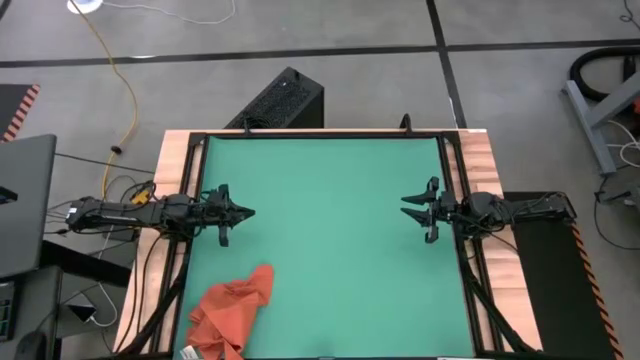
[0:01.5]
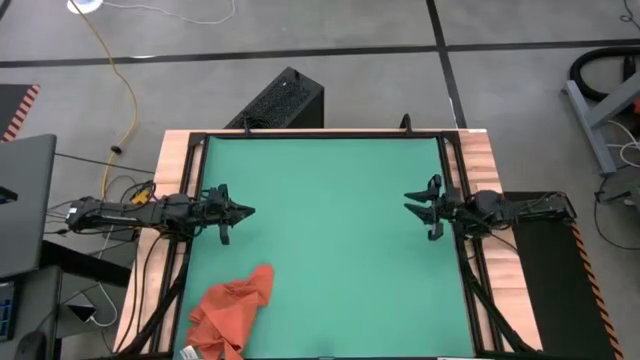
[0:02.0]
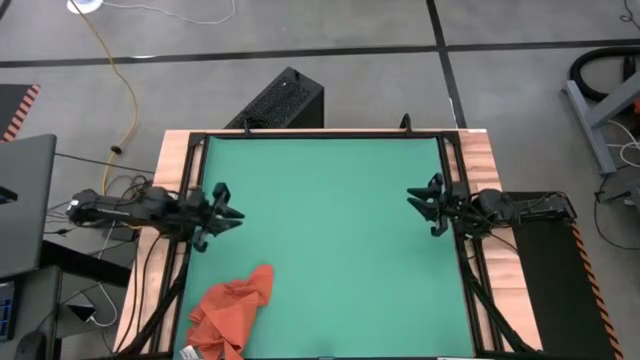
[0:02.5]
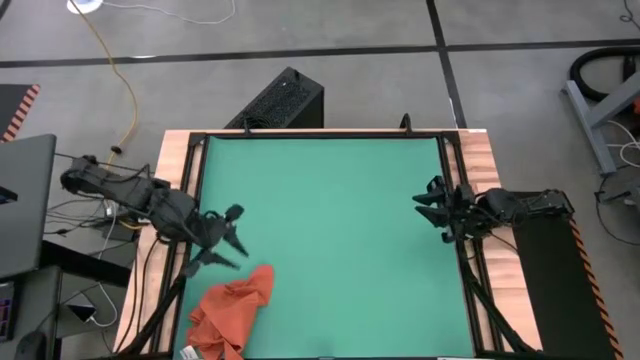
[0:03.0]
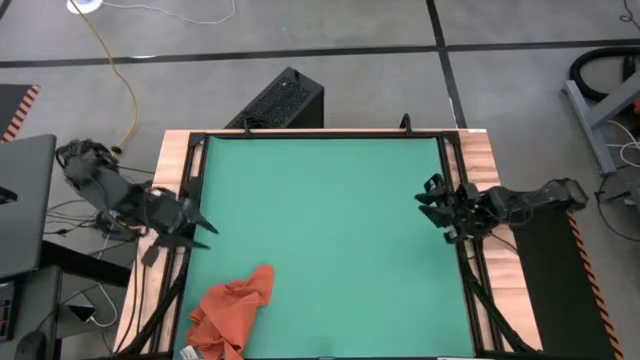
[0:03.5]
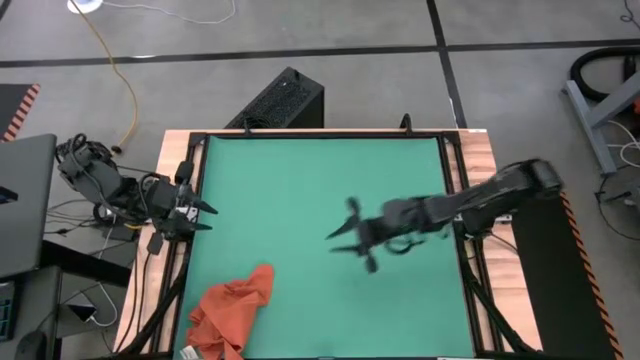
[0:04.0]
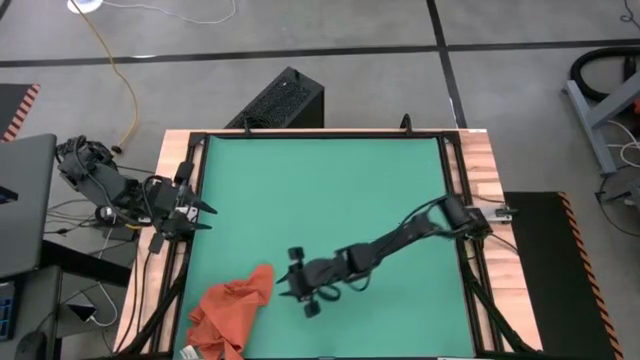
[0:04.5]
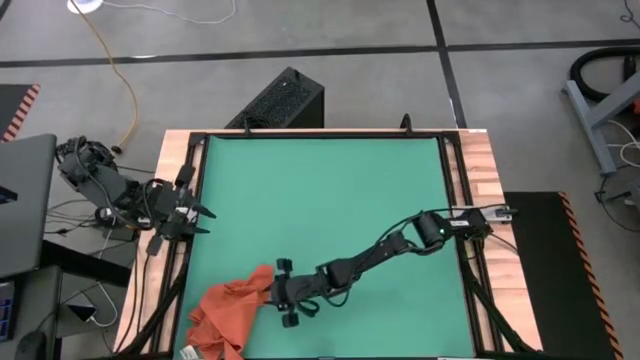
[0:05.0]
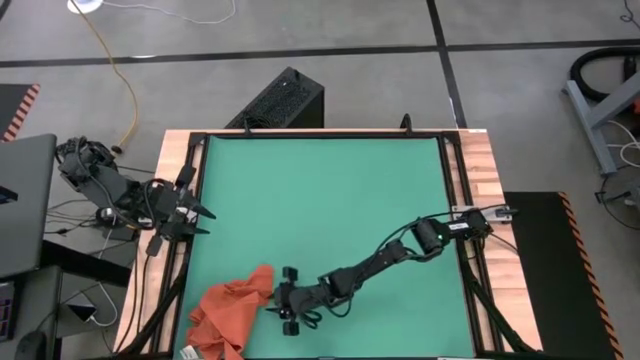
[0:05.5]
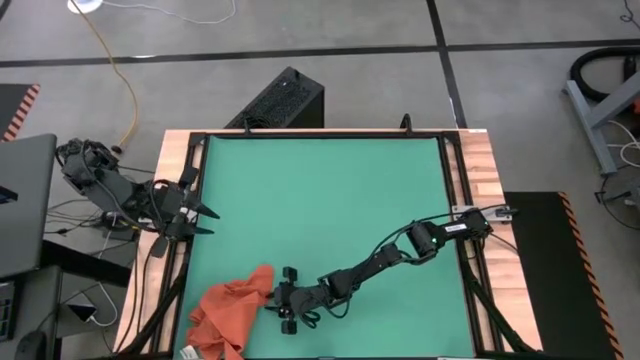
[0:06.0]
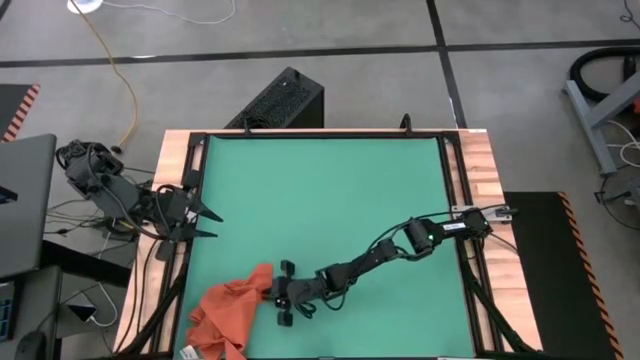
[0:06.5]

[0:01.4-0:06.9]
Task: Roll towel
Fold the orange towel

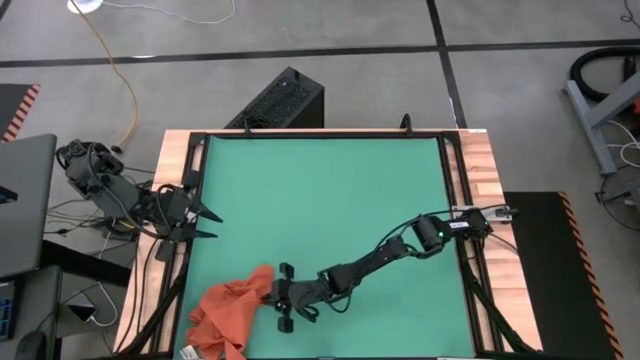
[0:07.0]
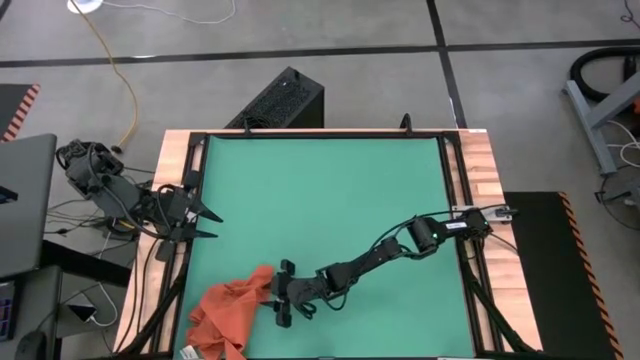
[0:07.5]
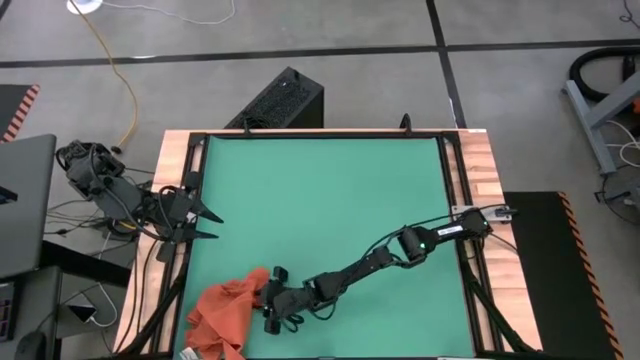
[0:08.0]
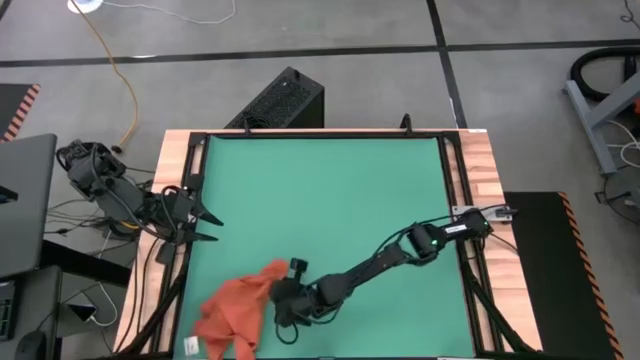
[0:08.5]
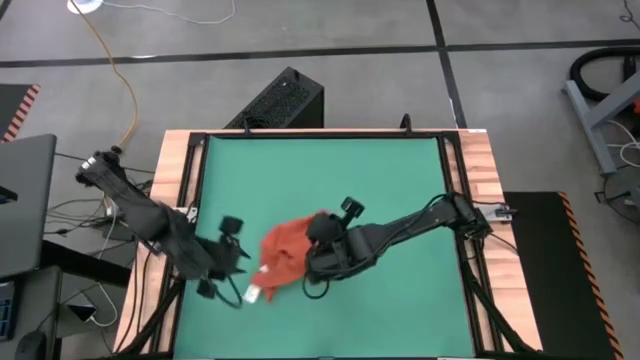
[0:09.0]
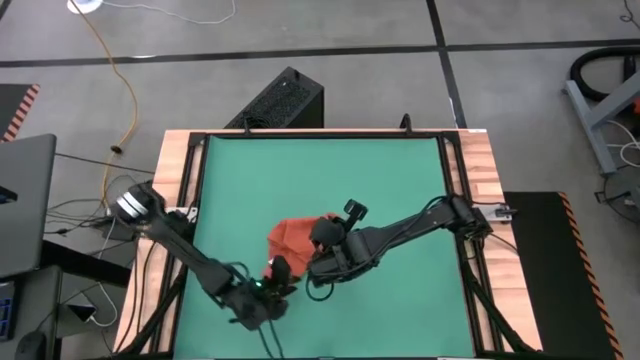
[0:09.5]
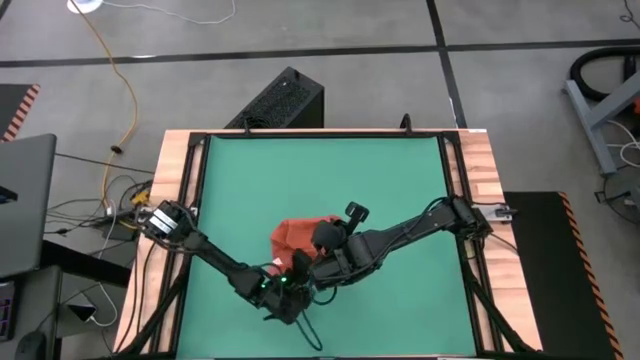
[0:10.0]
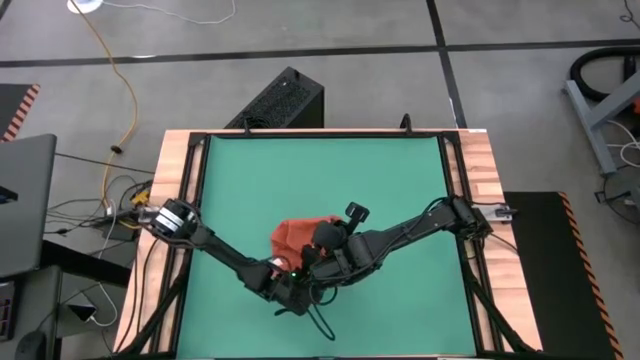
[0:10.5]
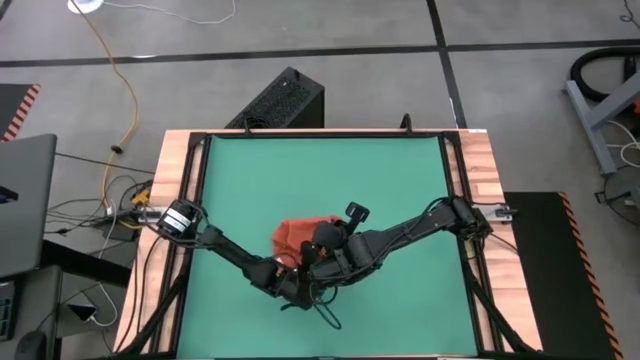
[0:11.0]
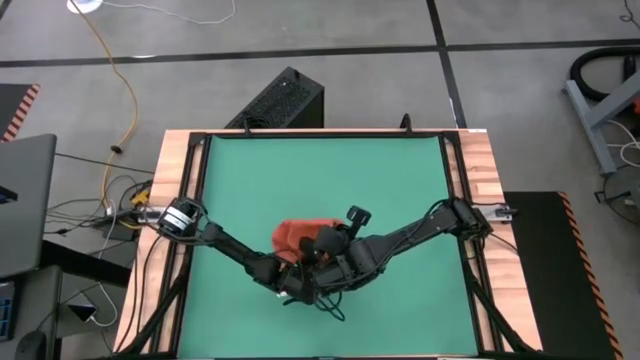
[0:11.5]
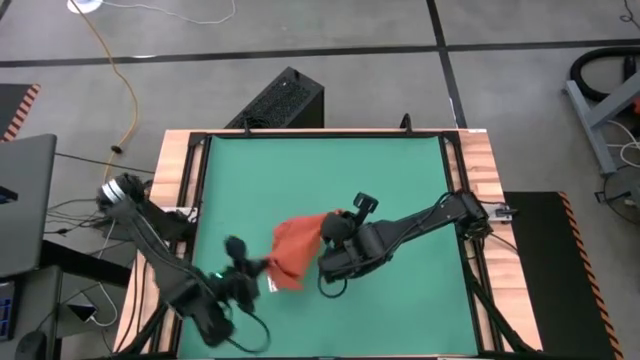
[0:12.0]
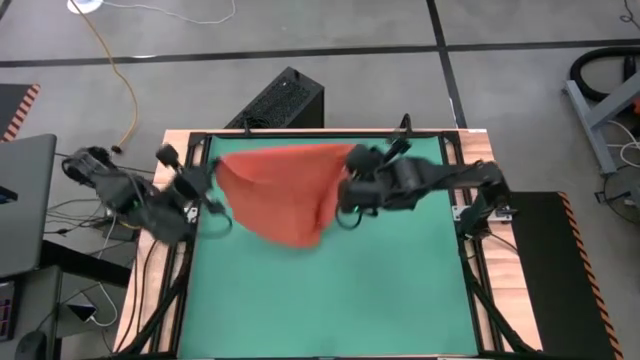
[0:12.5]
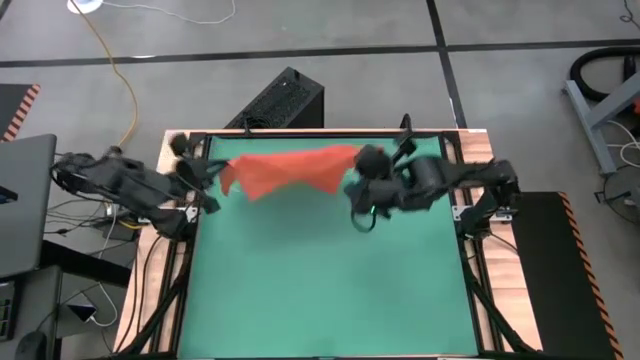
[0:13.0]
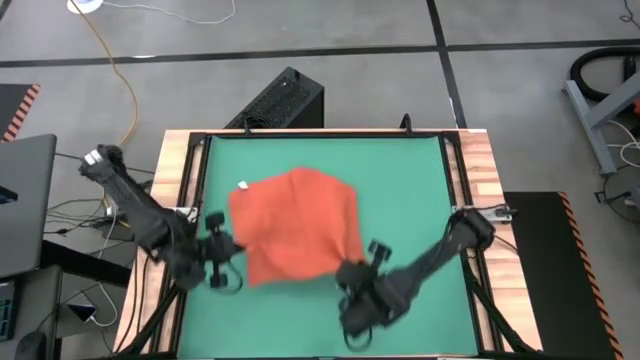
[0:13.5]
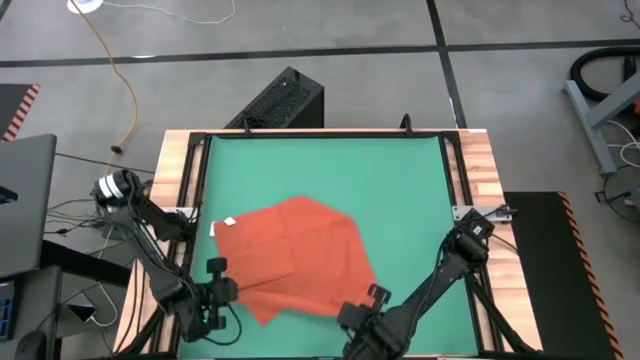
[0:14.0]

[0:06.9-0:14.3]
Fold the orange towel

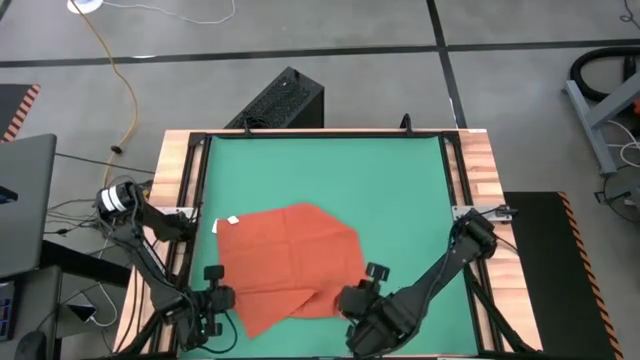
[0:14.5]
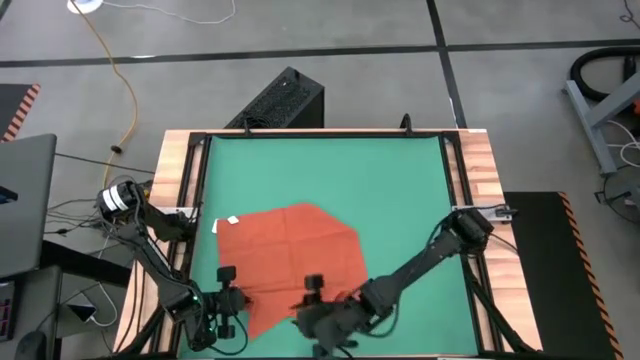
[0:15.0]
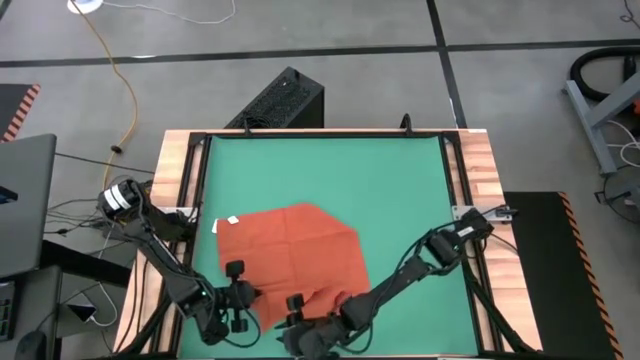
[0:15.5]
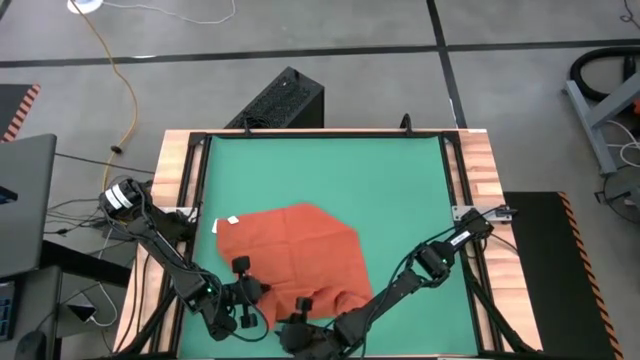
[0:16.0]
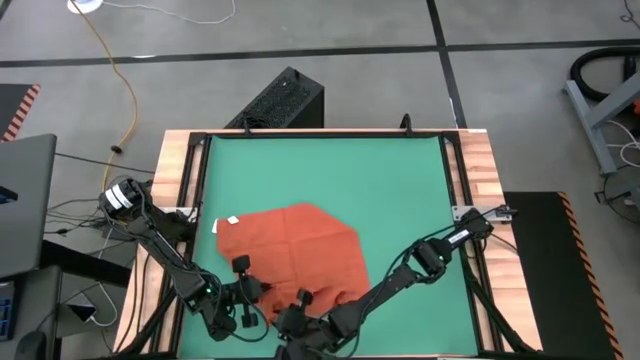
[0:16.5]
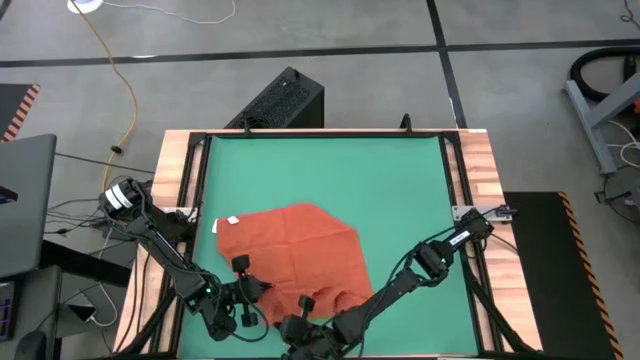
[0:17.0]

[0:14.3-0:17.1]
Fold the orange towel

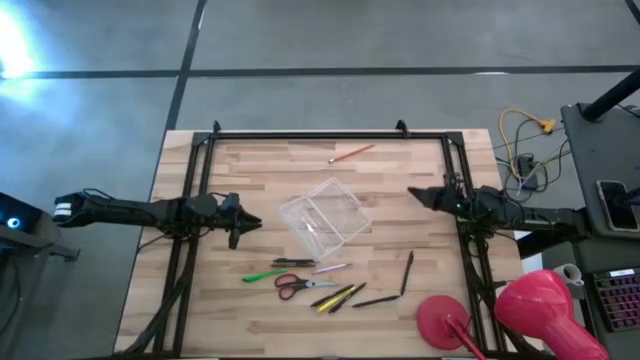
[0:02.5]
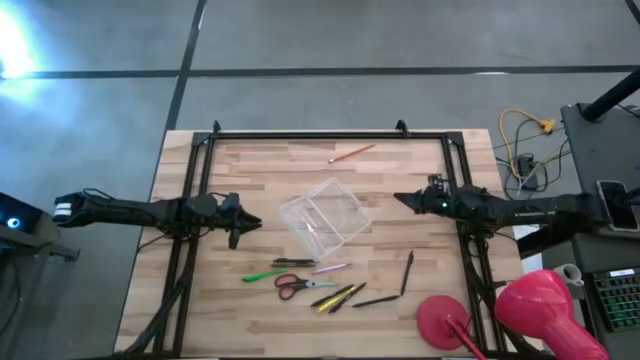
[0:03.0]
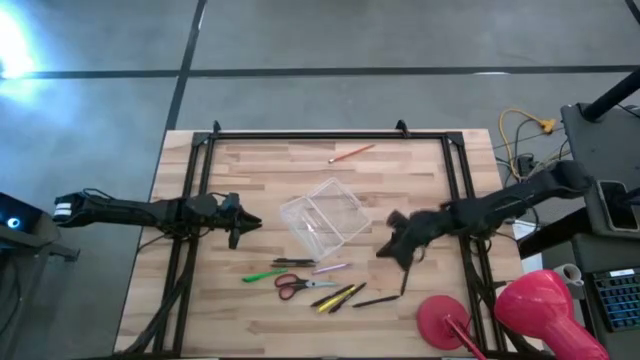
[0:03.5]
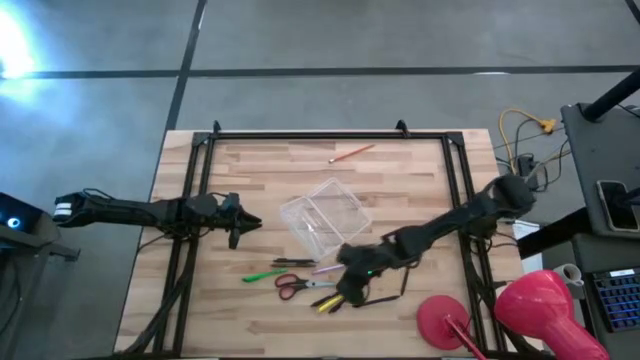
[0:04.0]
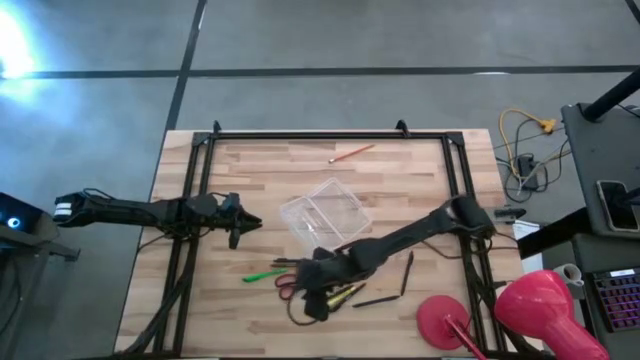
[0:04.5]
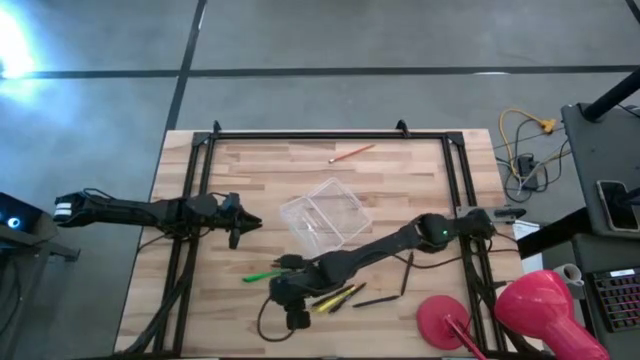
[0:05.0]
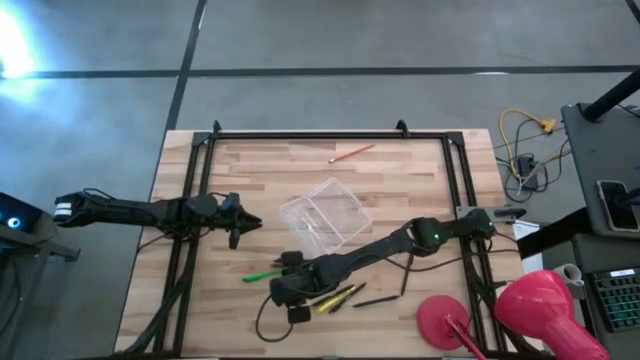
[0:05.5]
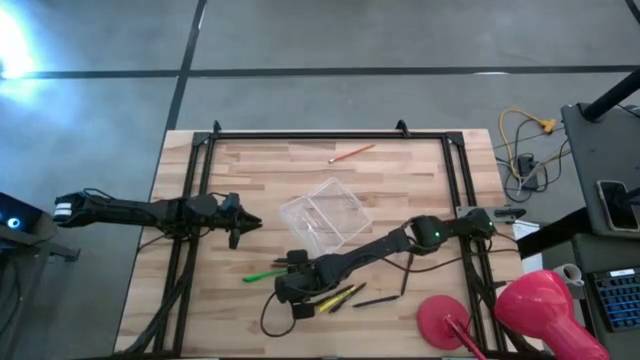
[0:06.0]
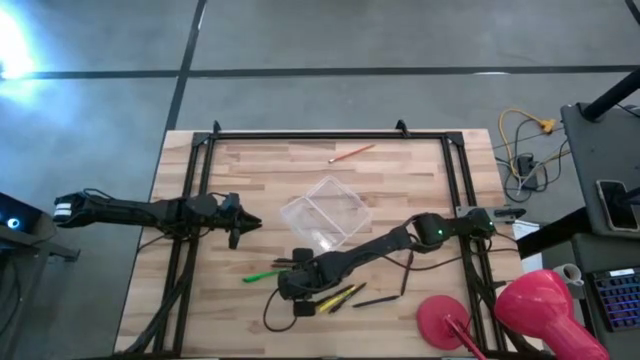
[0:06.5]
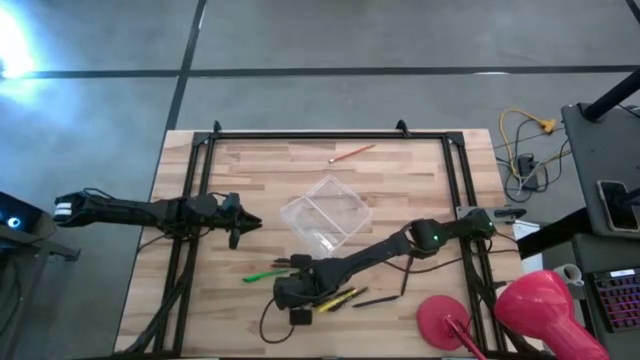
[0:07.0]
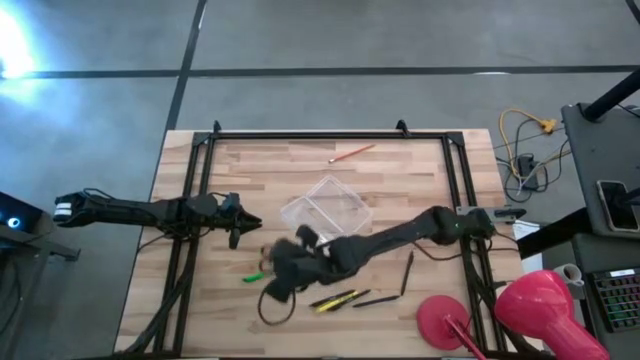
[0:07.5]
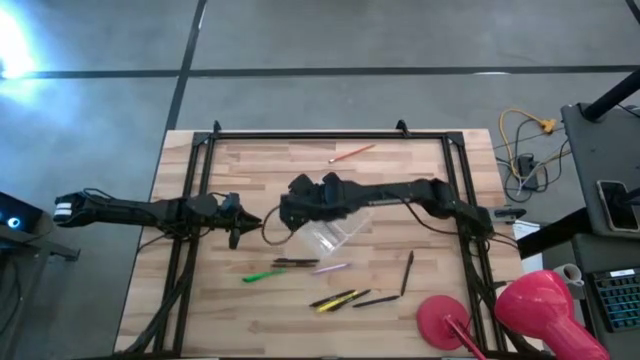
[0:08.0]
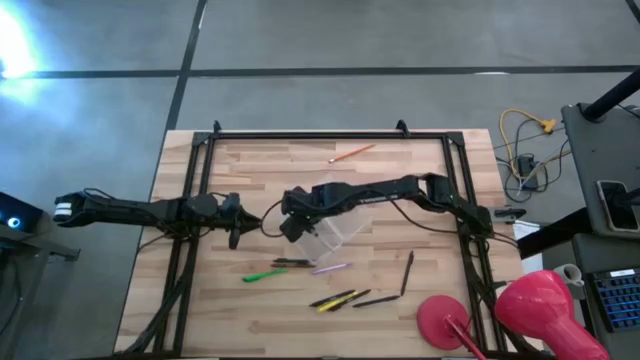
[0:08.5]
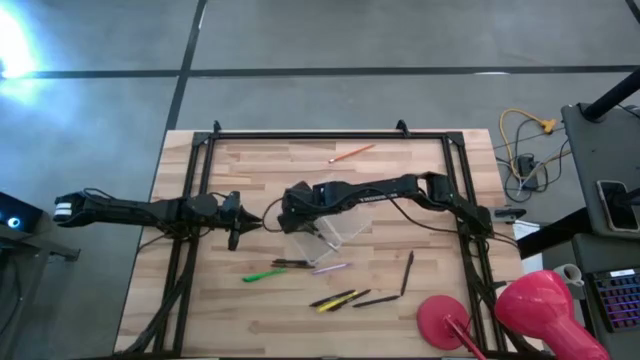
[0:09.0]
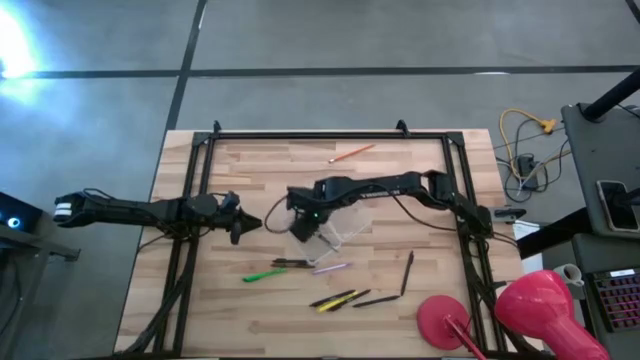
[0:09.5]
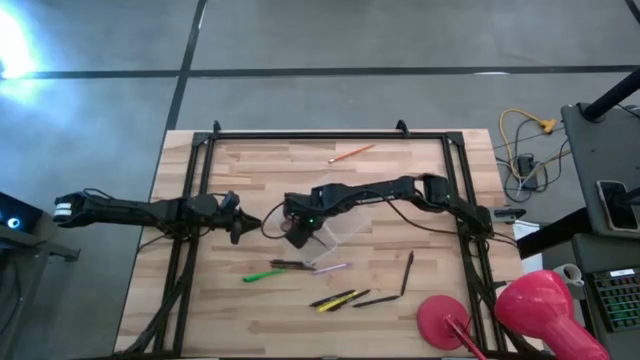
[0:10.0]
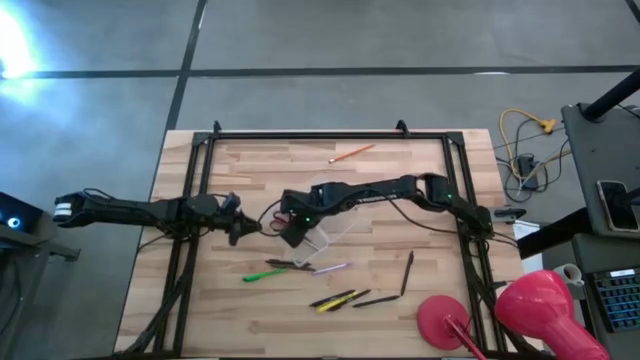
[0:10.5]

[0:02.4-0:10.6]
Task: Pick & place school supplies into a supply box
Put the scissors into the transparent case
